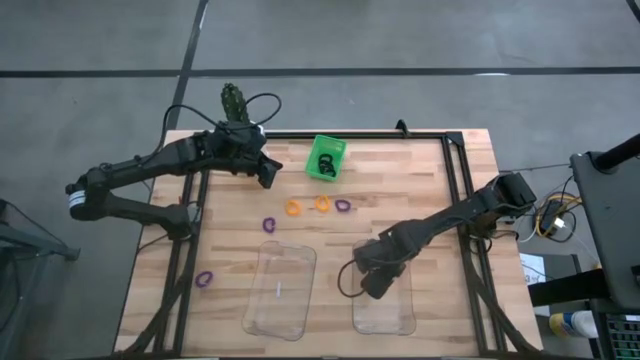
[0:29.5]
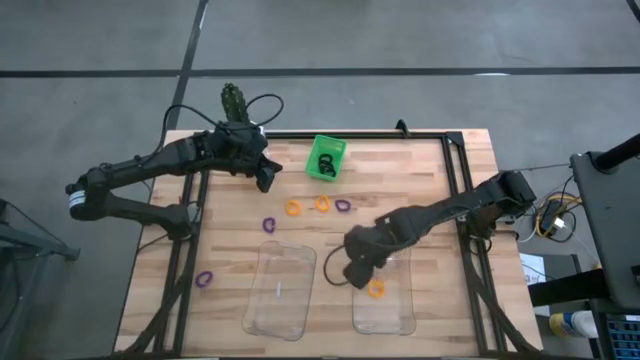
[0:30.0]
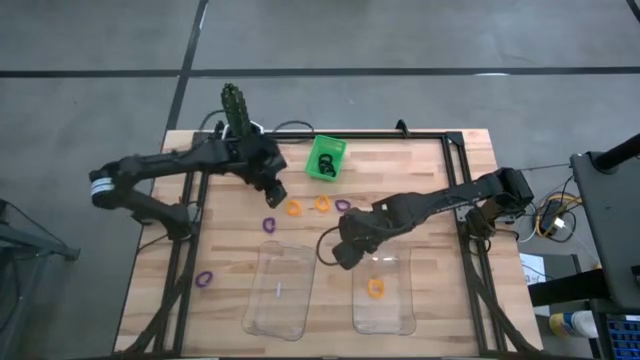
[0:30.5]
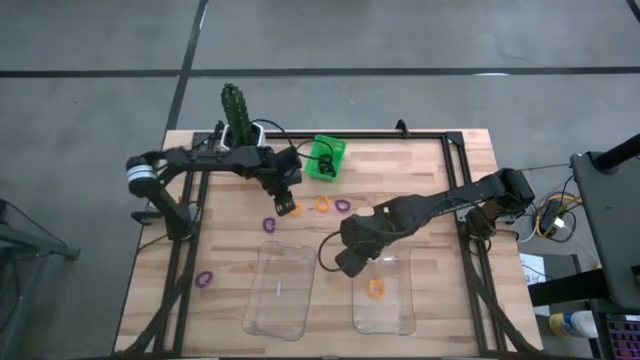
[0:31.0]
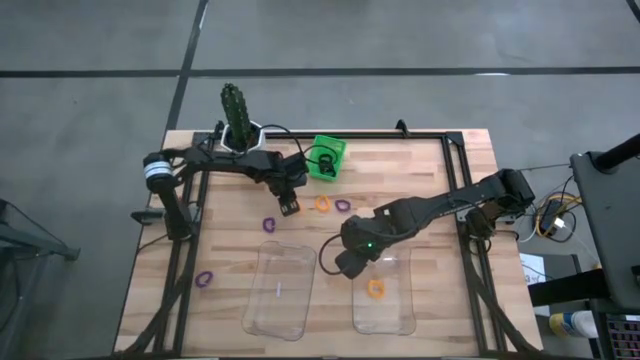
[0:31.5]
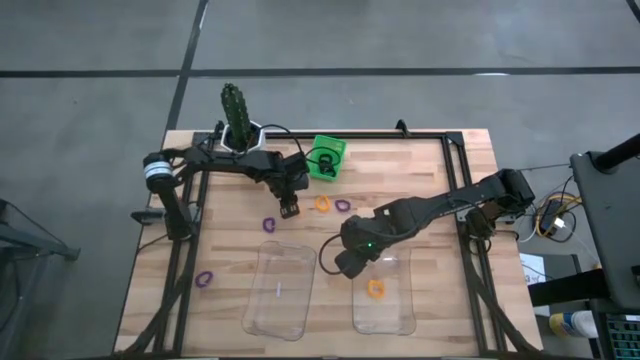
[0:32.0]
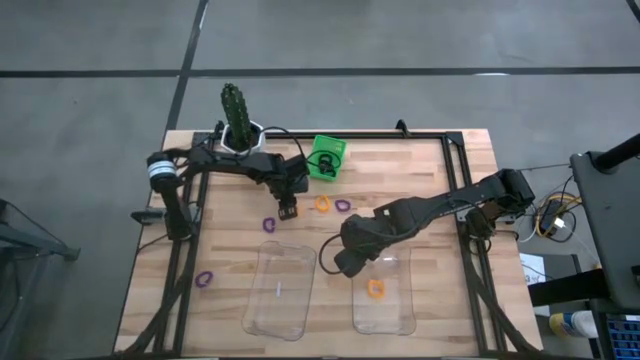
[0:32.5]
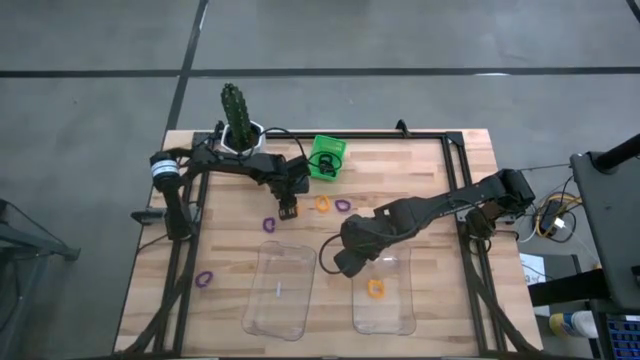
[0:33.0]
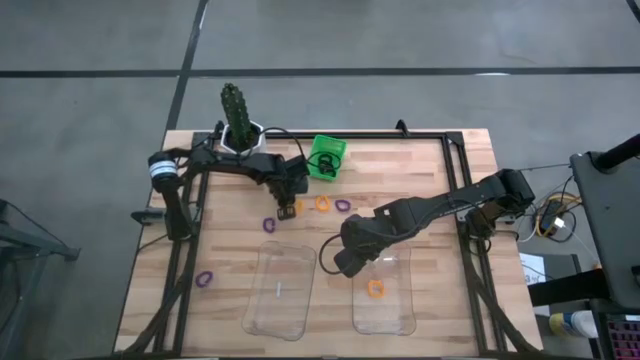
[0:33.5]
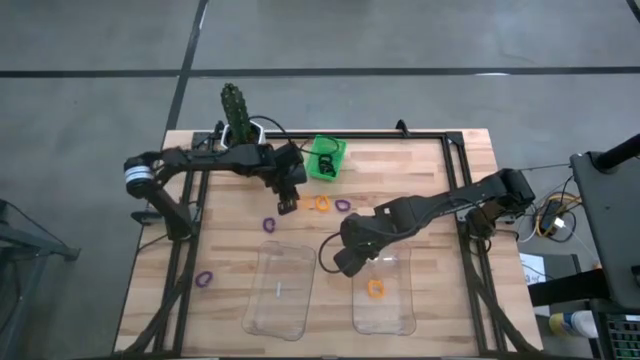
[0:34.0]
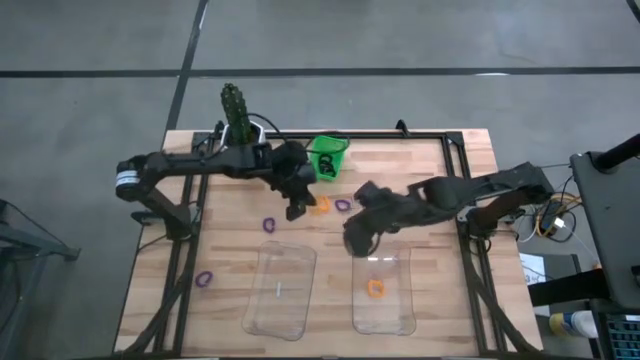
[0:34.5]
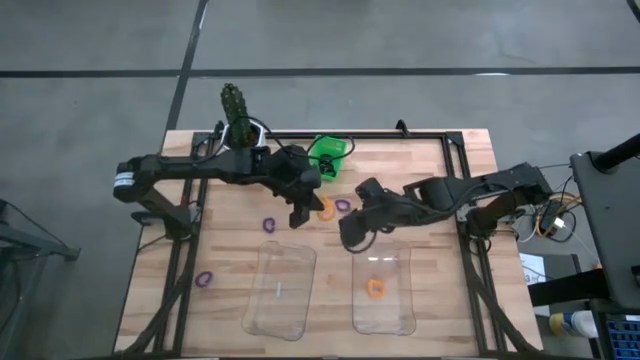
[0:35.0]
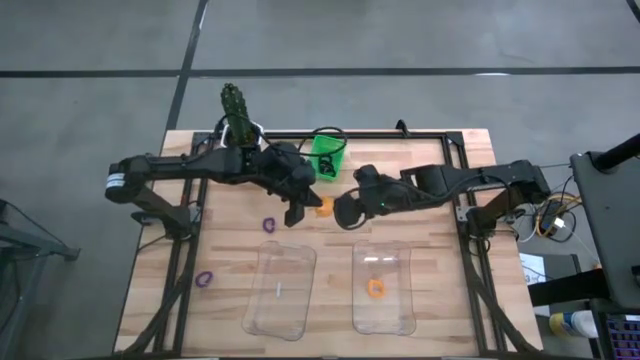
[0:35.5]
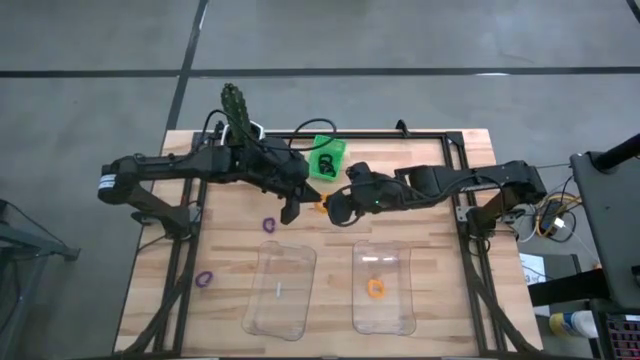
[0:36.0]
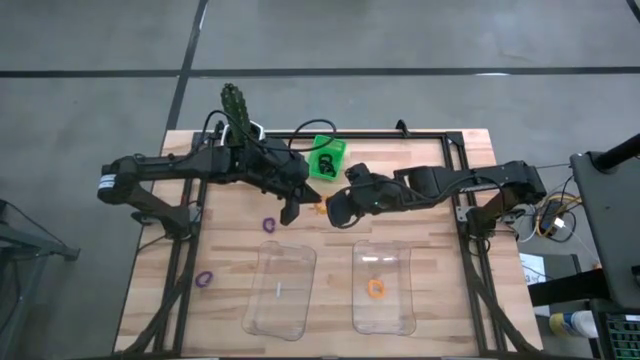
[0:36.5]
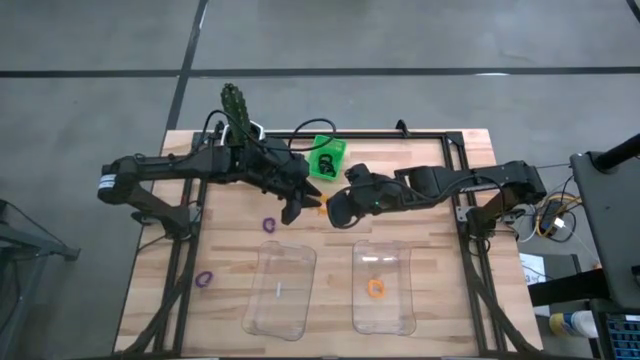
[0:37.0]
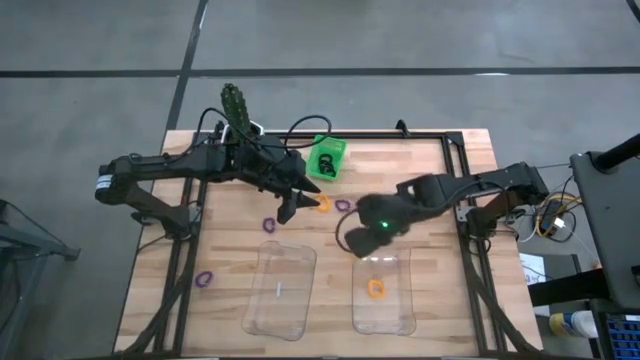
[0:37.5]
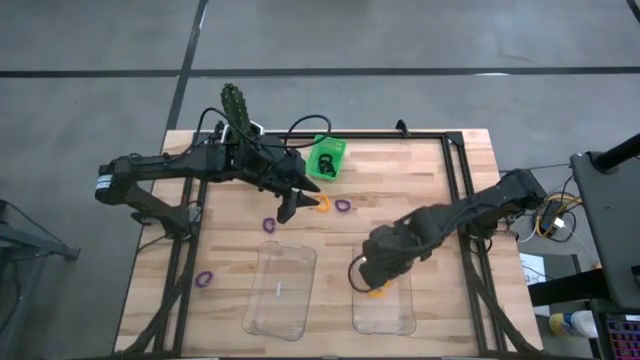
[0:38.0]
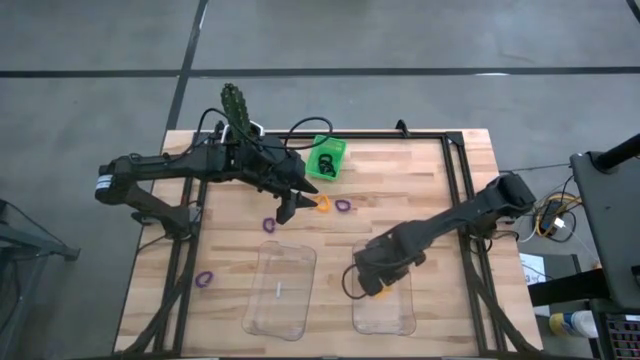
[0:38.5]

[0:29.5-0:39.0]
Task: Sort spring keychains
Put the left yellow spring keychain into the right transparent bin

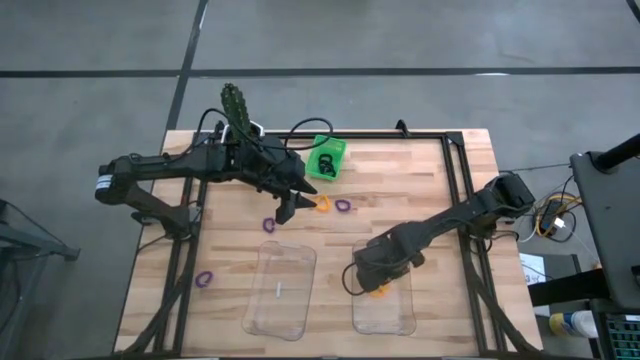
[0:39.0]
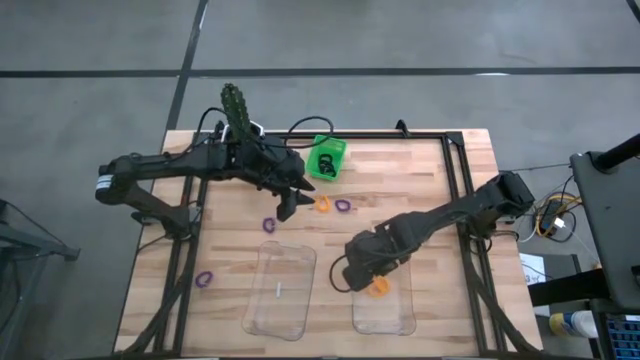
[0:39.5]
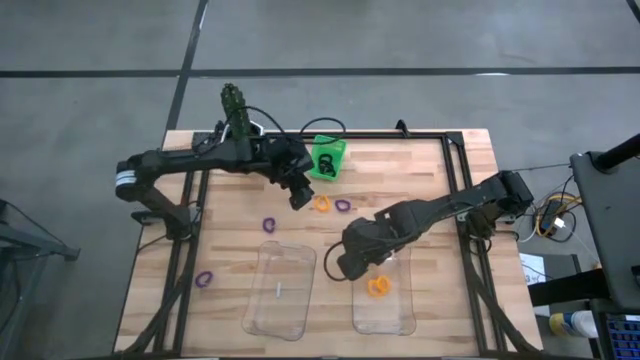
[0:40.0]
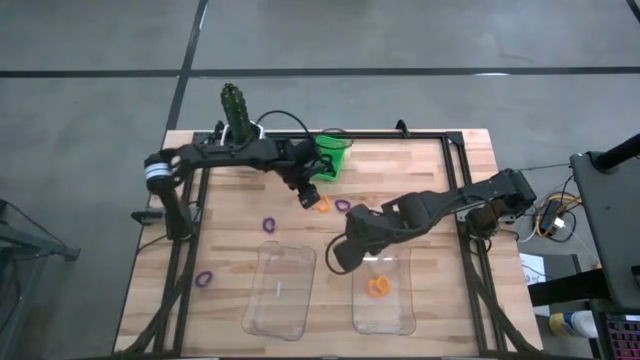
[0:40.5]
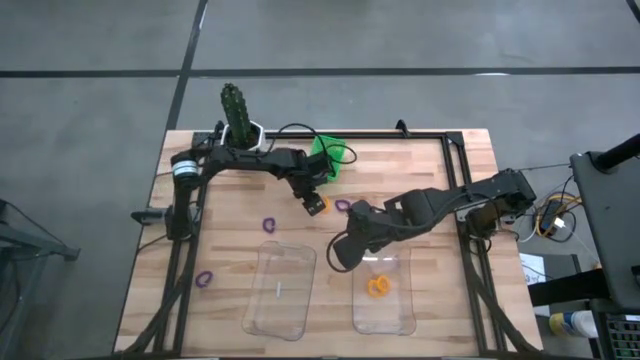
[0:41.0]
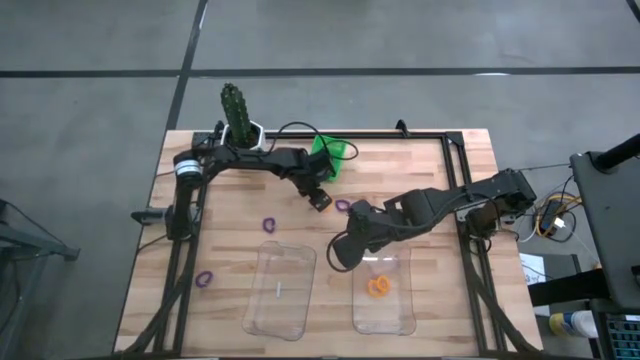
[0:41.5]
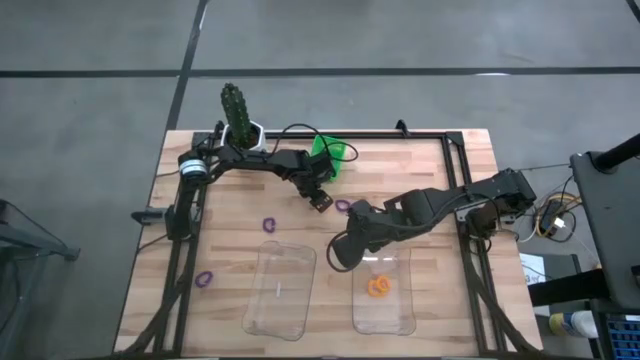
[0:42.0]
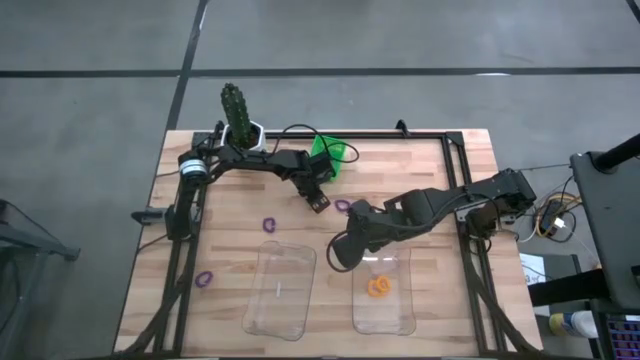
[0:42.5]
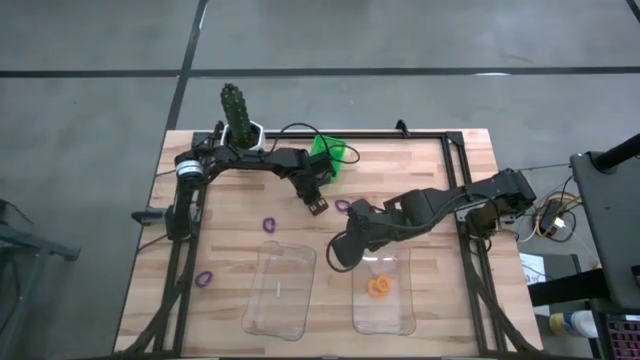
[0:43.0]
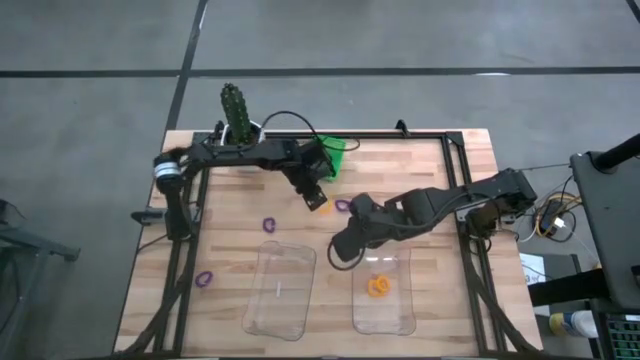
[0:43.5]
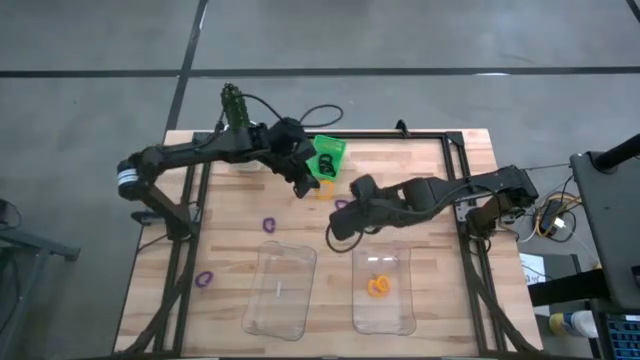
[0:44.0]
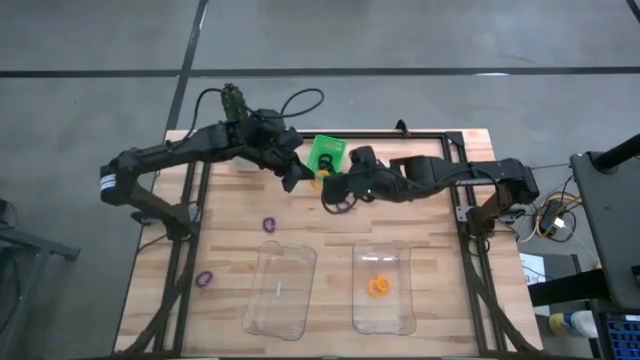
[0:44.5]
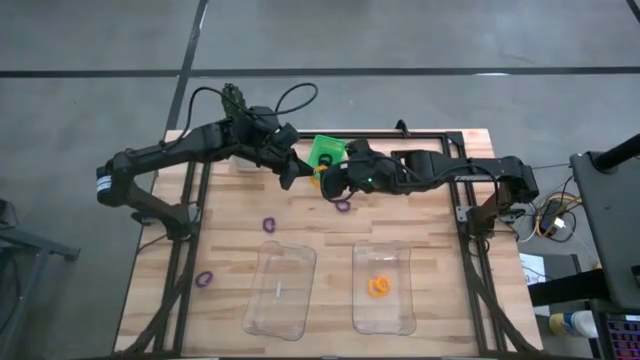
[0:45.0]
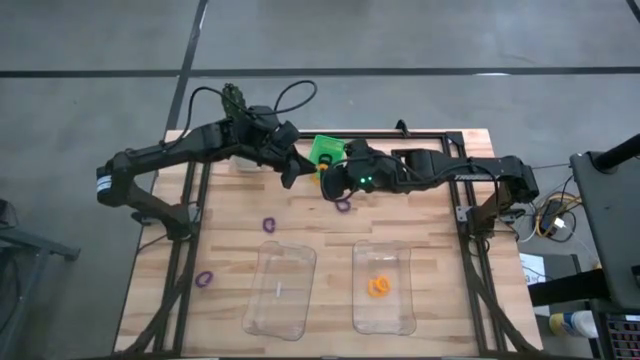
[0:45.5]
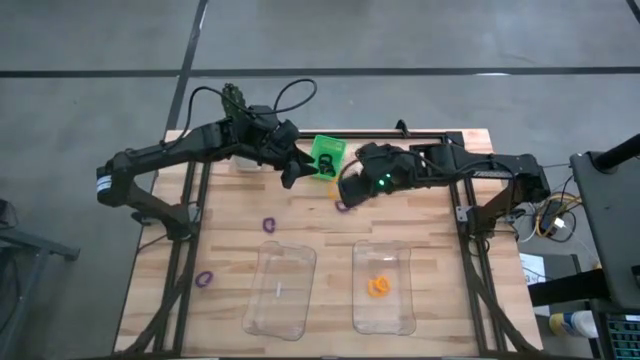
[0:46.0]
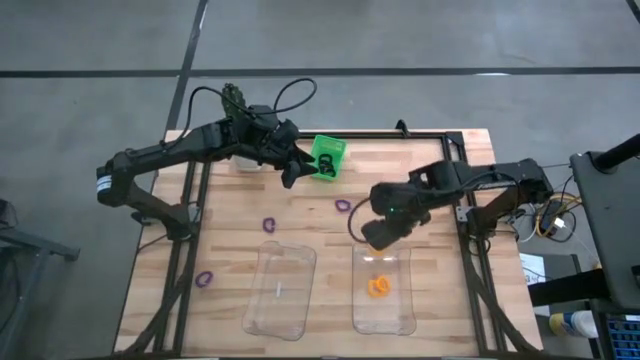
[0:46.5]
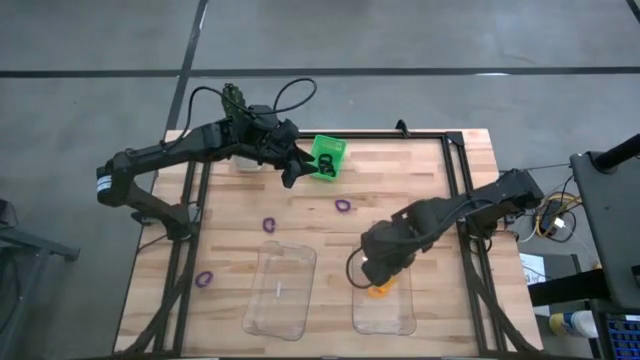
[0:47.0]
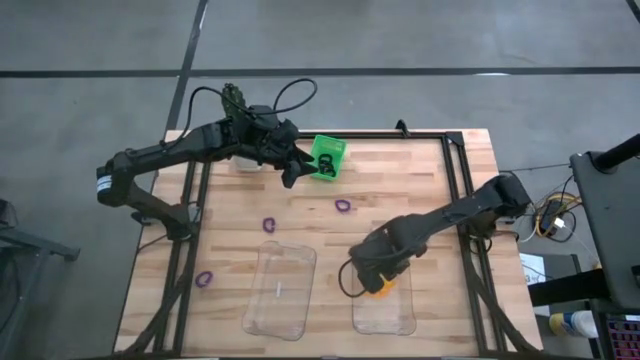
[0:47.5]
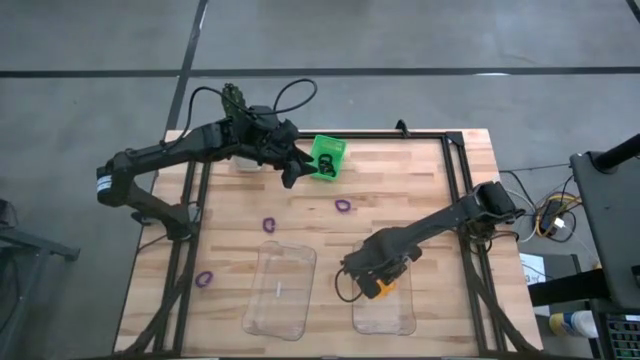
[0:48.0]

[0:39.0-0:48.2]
Put the yellow spring keychain into the right transparent bin

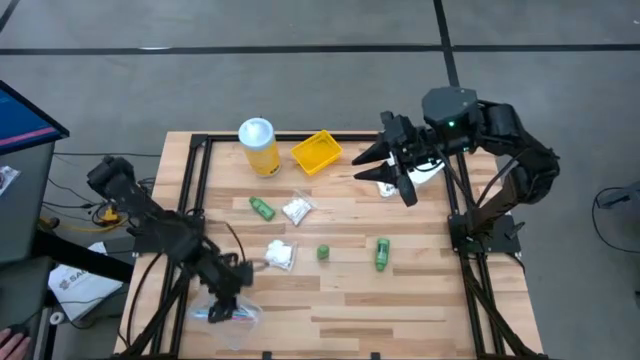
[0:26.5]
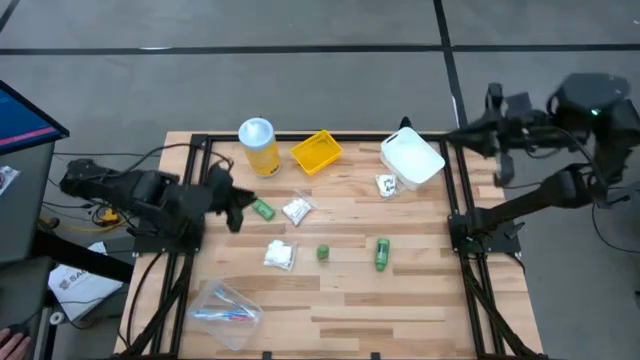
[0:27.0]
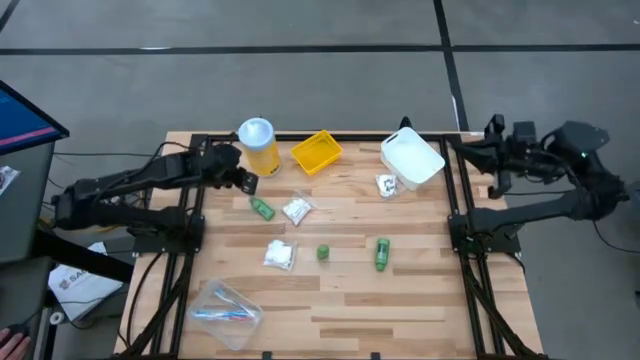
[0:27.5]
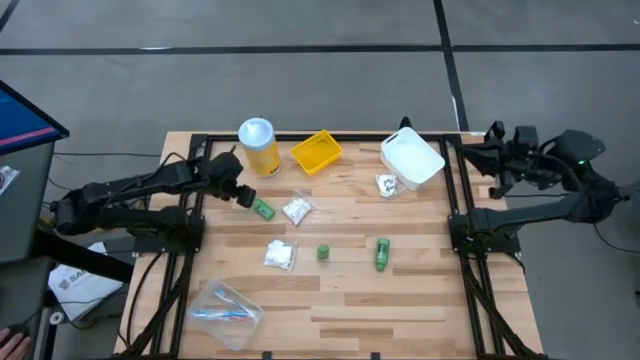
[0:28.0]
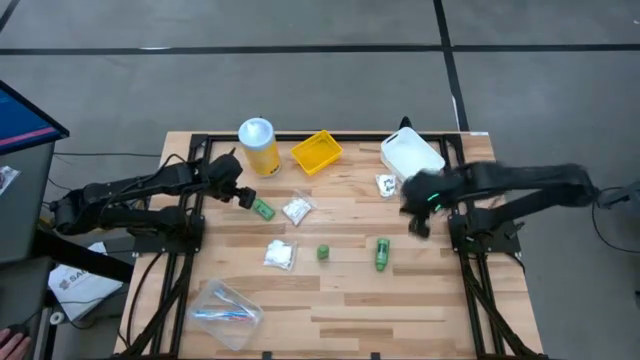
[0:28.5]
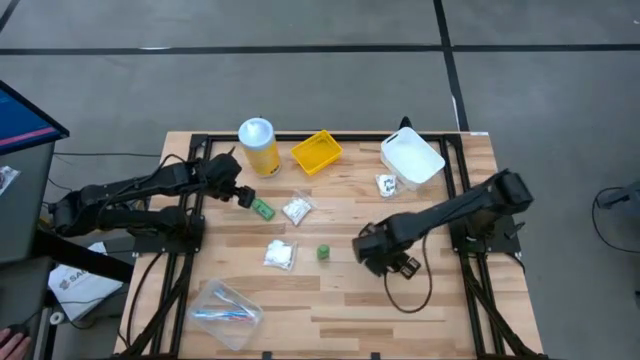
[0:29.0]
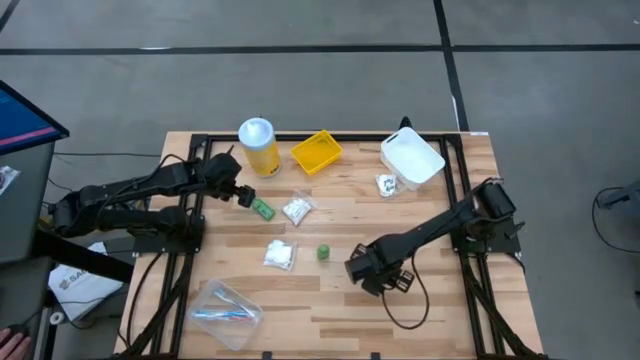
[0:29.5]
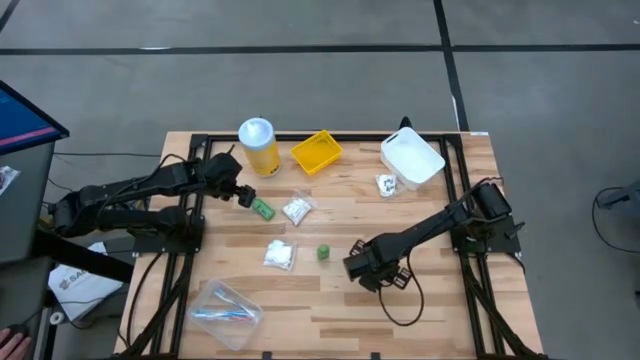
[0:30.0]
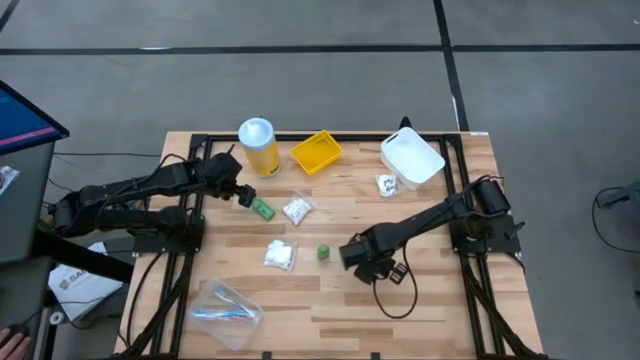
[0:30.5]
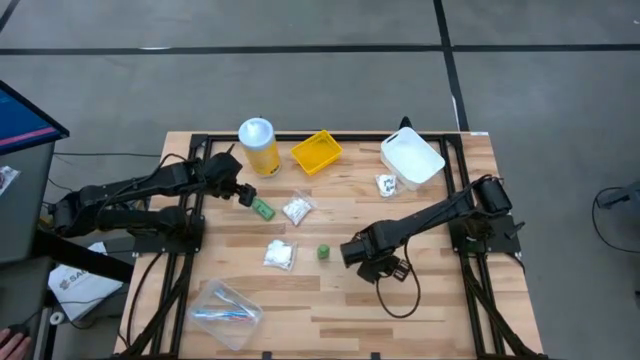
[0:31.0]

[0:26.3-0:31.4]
Task: Pick & Place Travel size toiletries
Put the green shampoo bottle into the white bin
